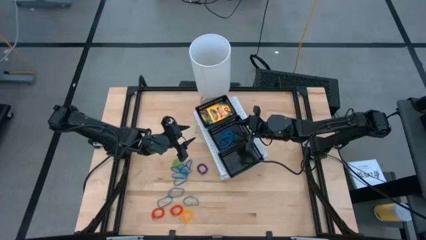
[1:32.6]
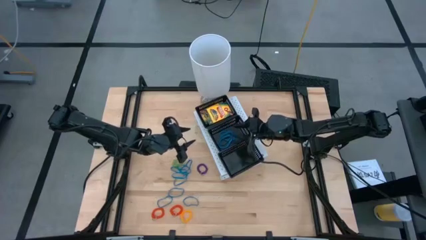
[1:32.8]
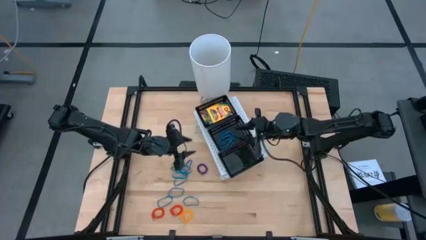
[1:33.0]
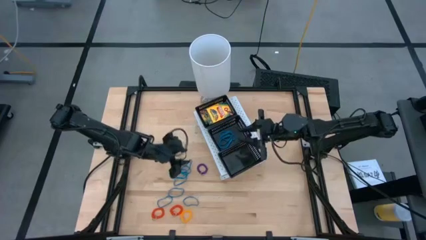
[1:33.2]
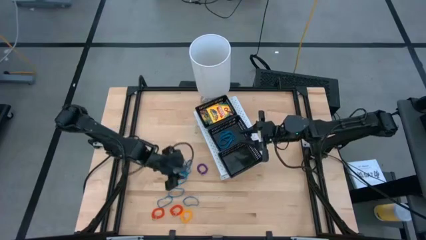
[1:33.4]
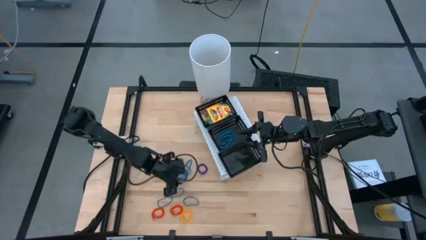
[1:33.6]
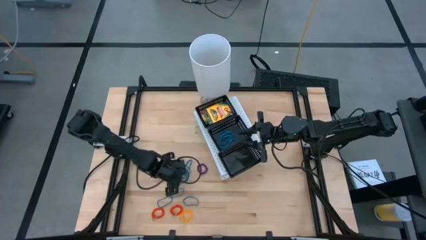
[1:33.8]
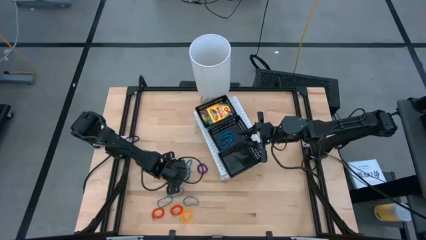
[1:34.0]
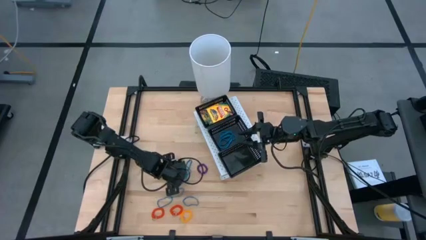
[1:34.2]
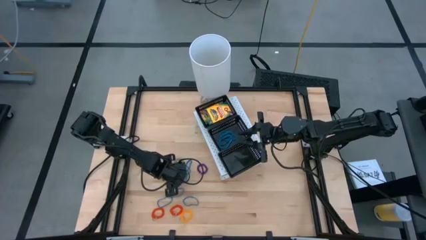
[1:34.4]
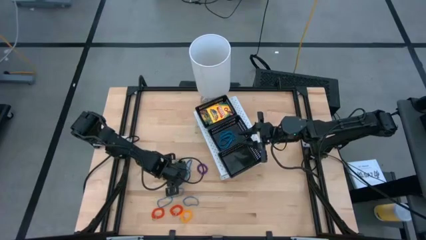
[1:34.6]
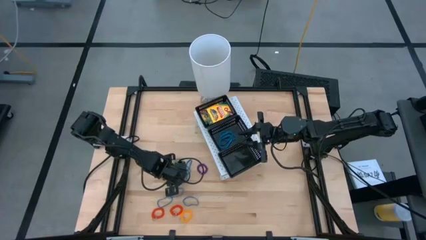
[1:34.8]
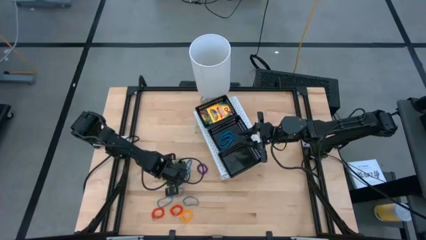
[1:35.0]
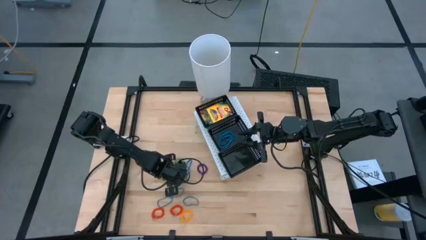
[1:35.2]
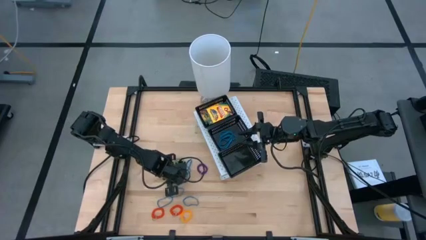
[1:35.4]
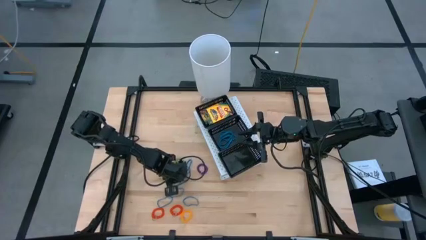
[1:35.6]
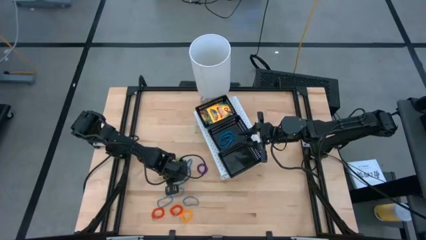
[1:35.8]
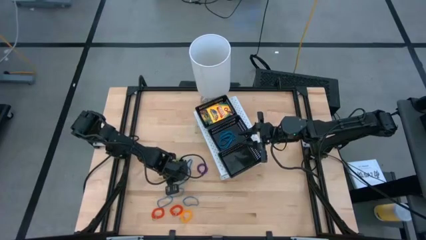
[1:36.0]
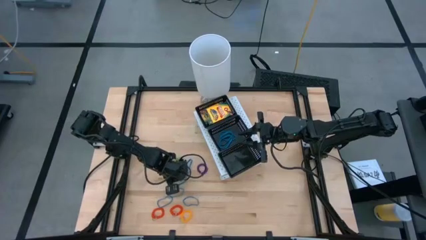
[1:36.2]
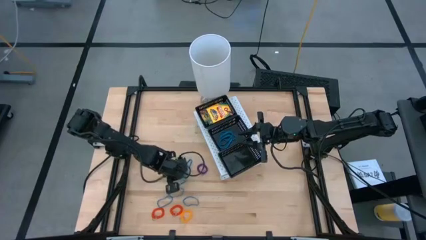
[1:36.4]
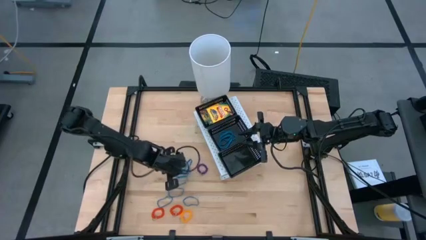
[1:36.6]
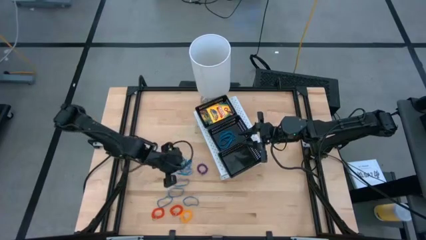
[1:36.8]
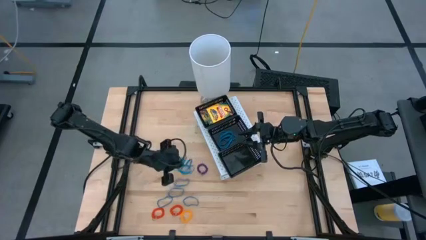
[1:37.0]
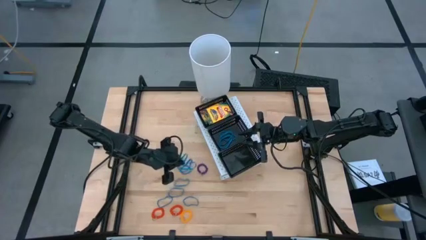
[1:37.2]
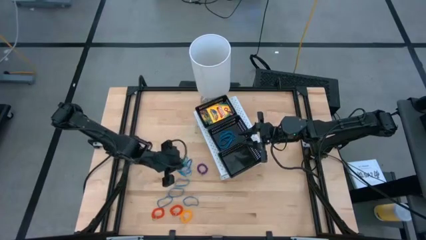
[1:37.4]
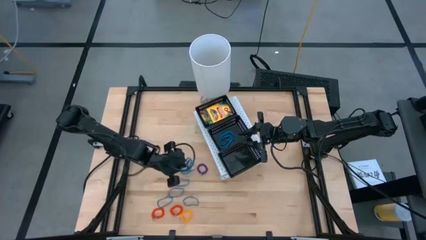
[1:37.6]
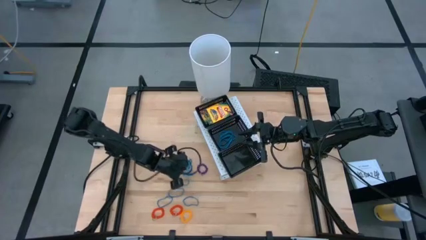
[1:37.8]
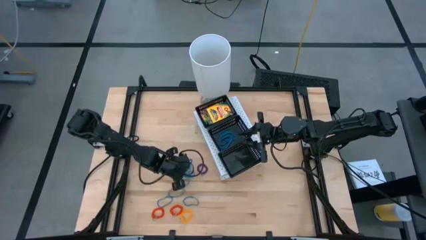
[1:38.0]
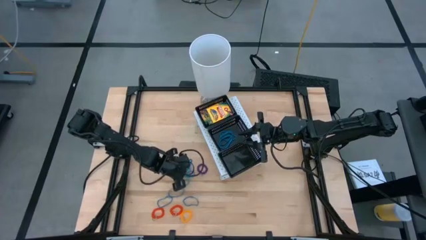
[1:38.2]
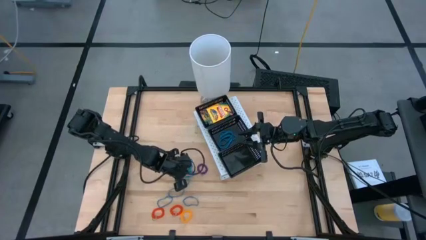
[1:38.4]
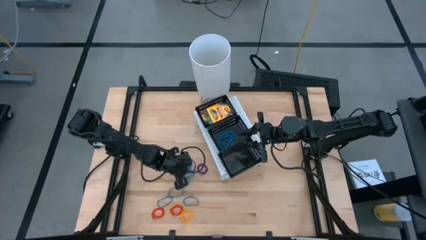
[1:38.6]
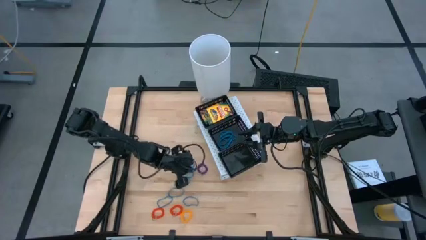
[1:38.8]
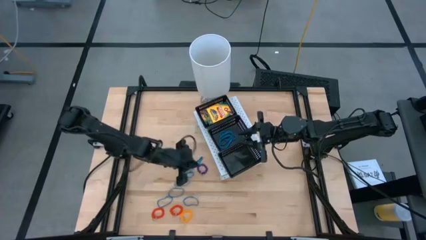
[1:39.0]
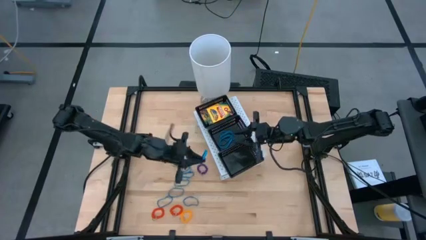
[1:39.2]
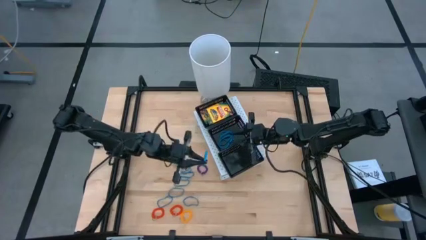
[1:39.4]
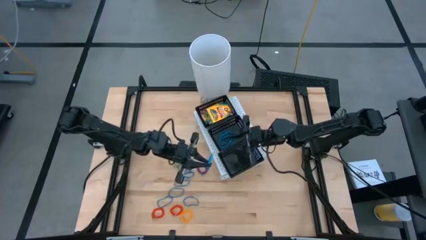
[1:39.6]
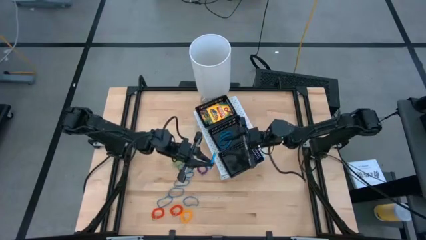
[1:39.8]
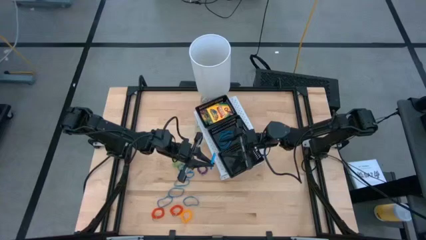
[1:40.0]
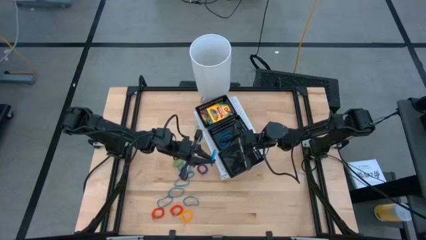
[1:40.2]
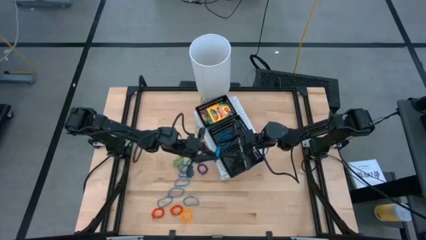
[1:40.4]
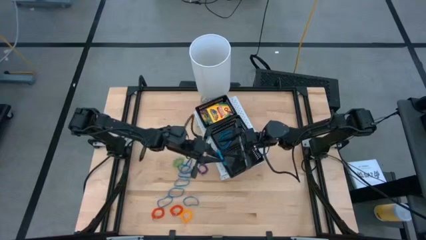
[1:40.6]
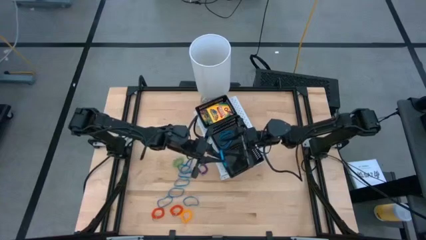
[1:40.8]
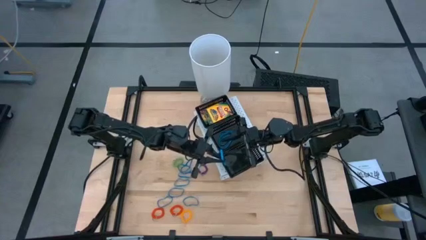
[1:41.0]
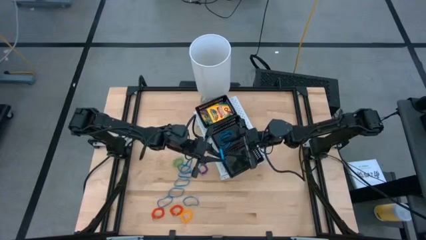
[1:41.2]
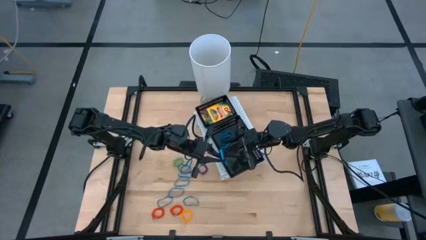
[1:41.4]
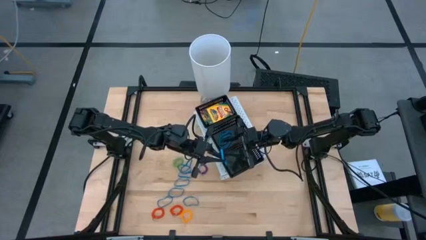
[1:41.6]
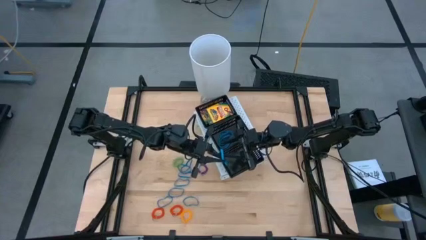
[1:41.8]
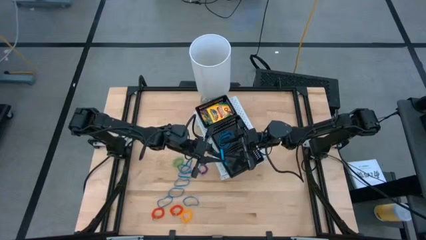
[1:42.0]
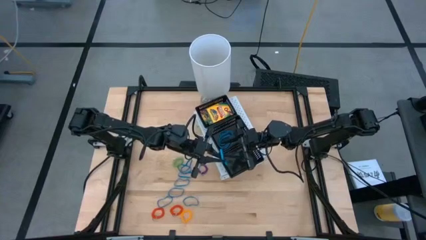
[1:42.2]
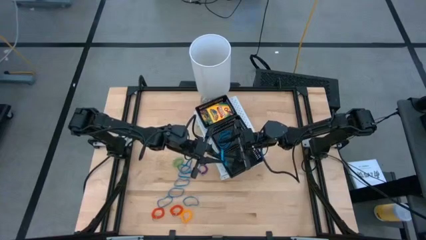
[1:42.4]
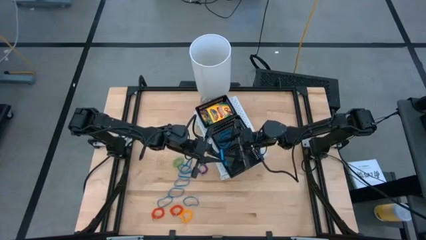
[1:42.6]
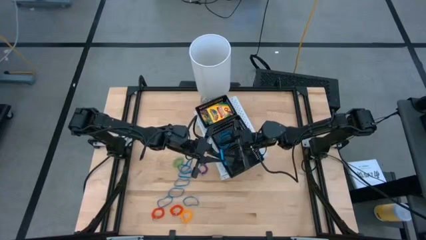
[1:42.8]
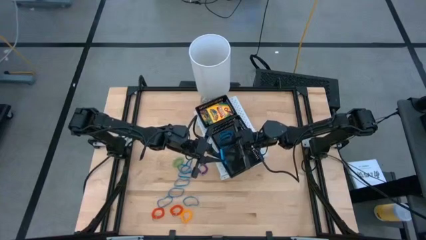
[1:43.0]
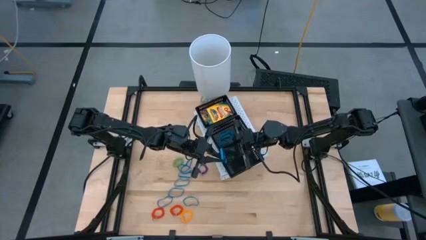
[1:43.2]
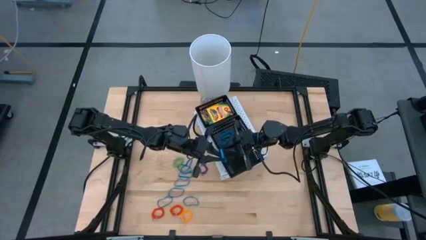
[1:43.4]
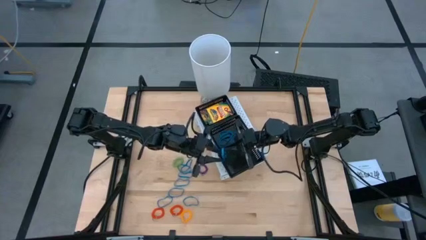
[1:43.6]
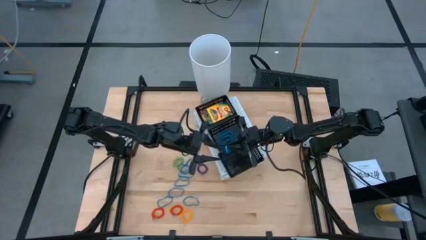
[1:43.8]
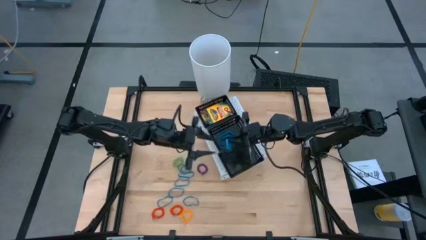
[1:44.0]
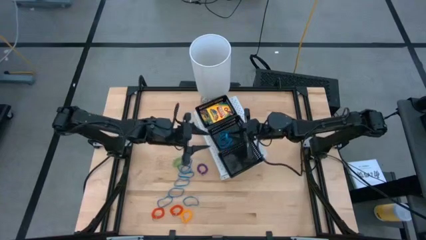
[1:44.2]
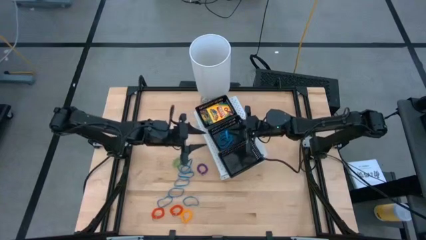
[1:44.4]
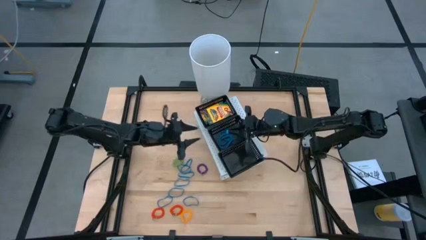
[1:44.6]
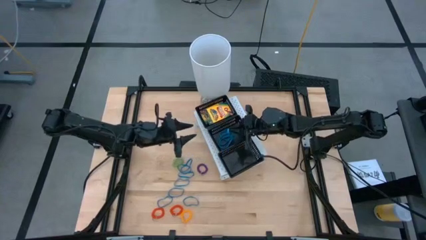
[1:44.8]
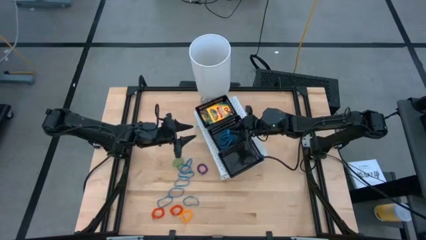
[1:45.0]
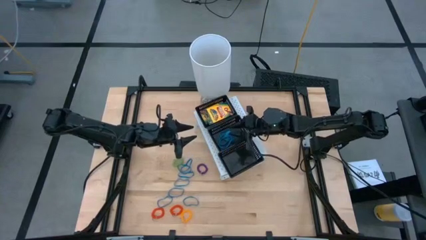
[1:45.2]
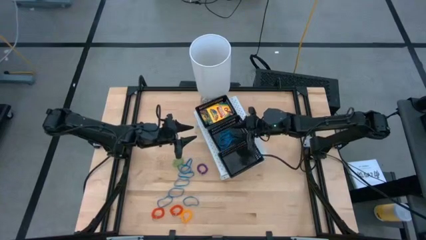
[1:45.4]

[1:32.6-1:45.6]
Task: Pick & Place Office Desk Supplies
Put the blue rubber band into the middle black bin on the shelf
